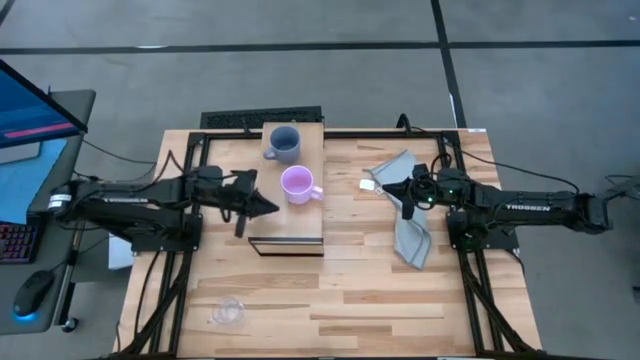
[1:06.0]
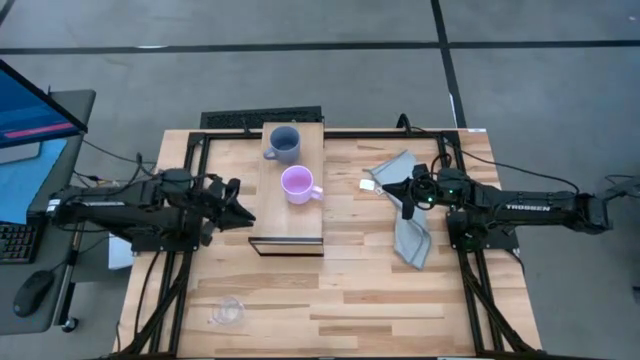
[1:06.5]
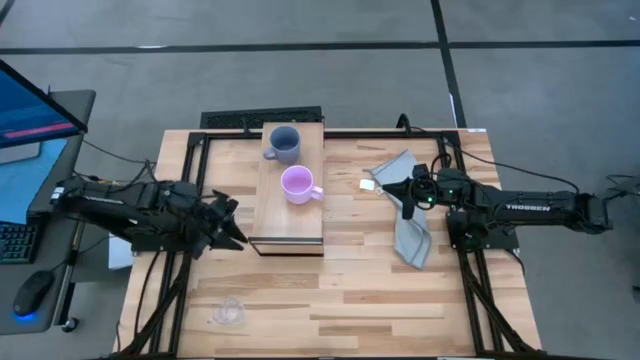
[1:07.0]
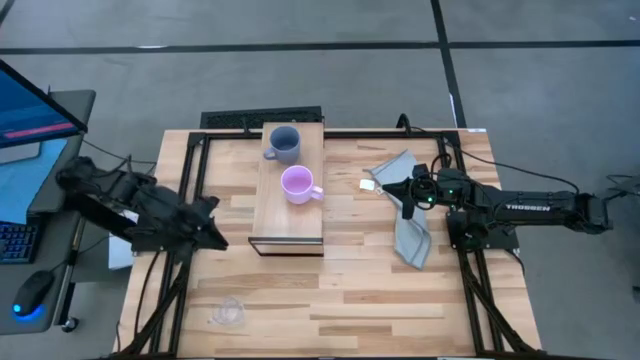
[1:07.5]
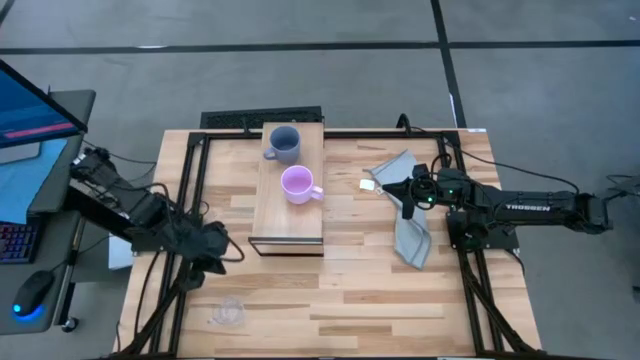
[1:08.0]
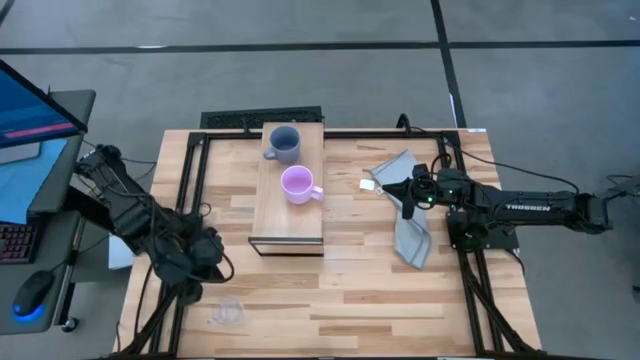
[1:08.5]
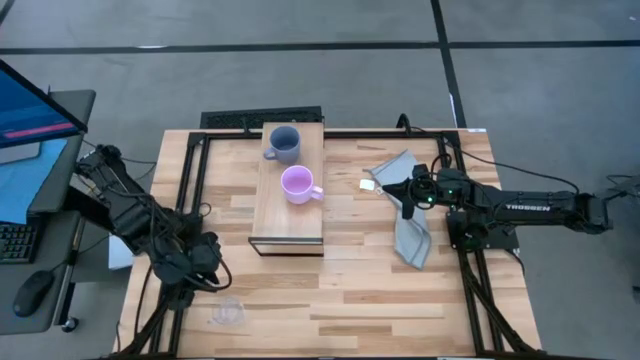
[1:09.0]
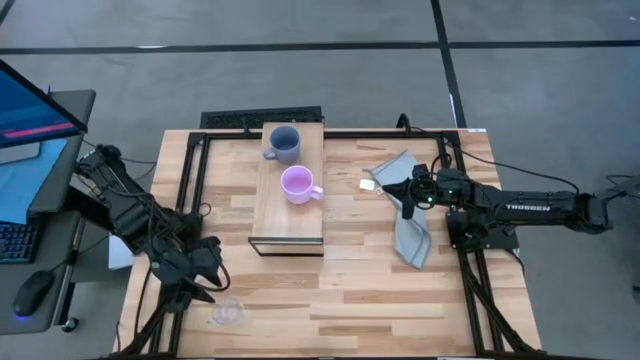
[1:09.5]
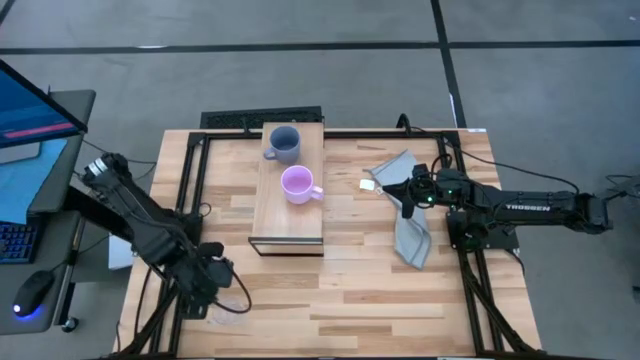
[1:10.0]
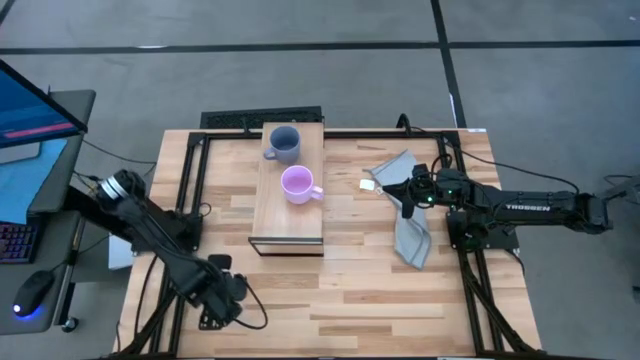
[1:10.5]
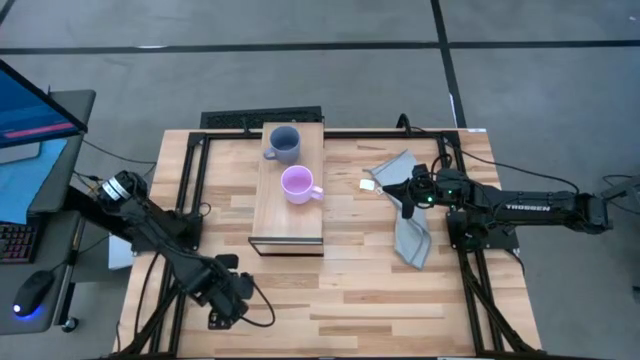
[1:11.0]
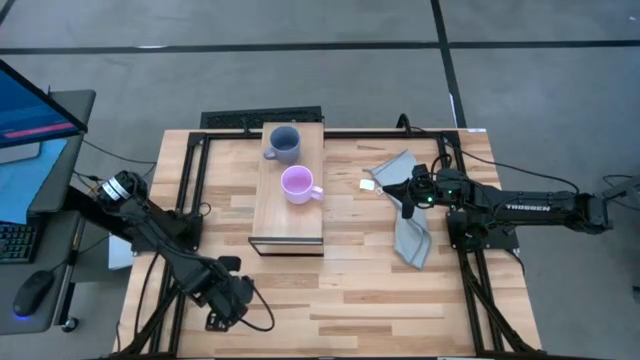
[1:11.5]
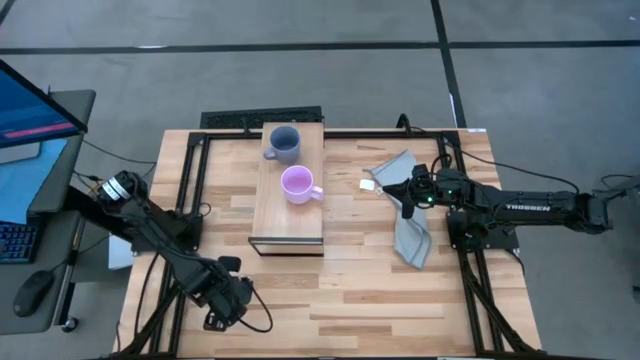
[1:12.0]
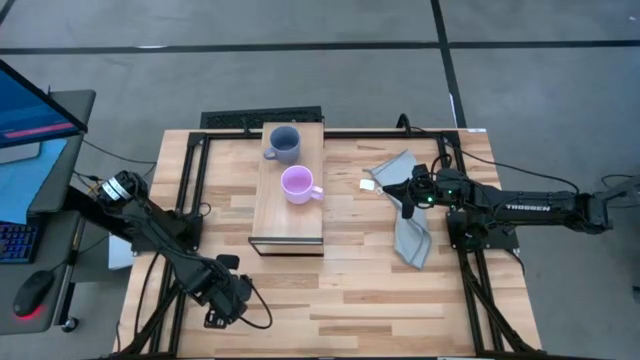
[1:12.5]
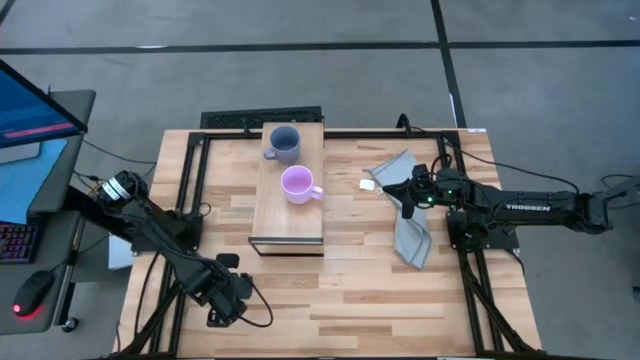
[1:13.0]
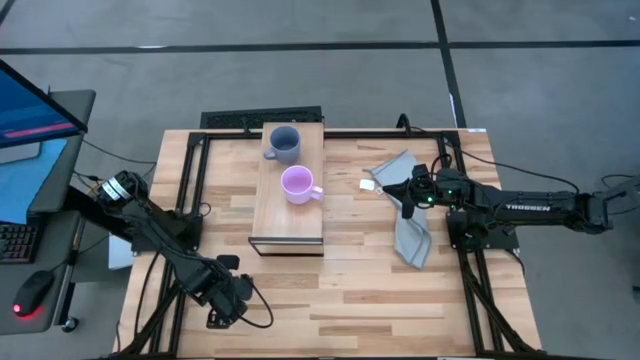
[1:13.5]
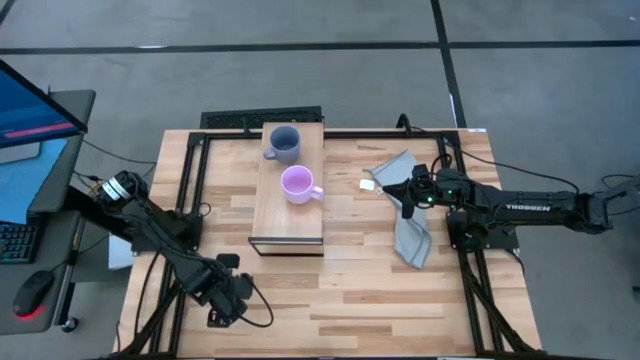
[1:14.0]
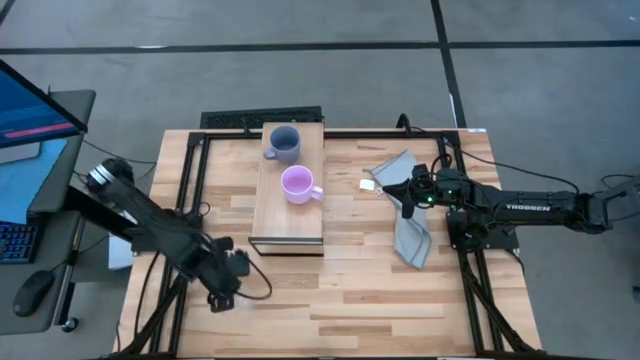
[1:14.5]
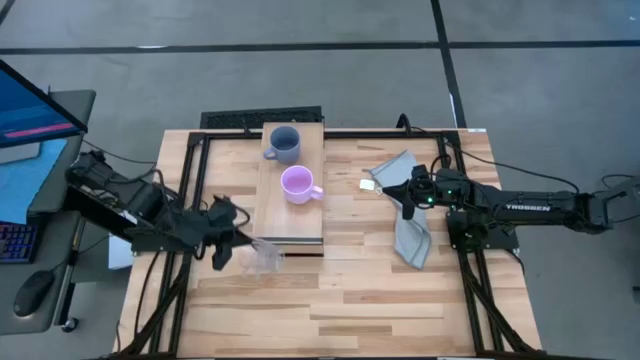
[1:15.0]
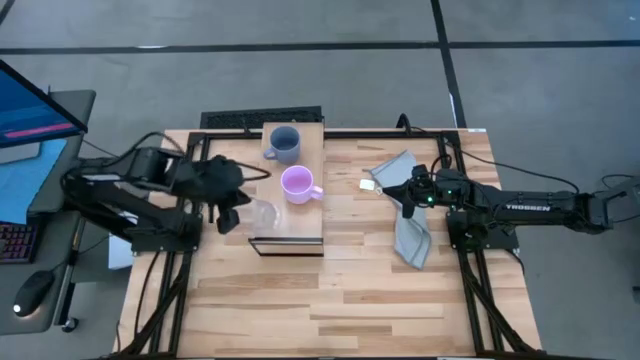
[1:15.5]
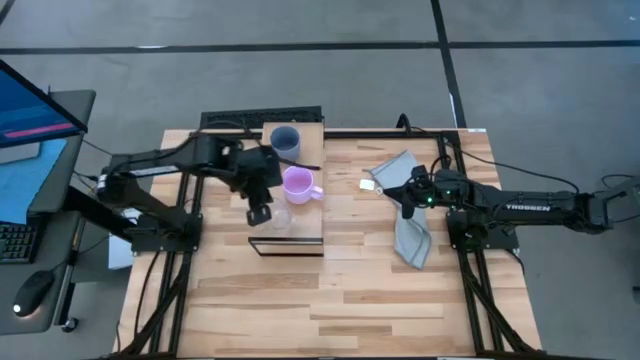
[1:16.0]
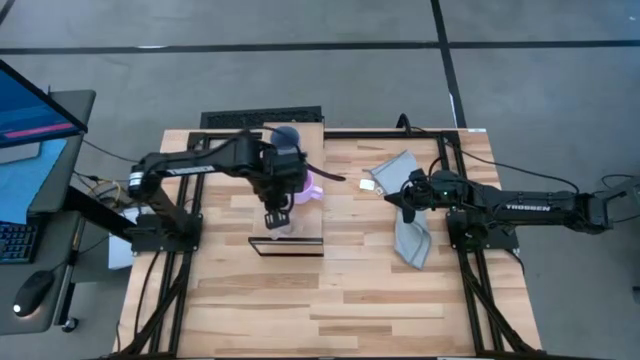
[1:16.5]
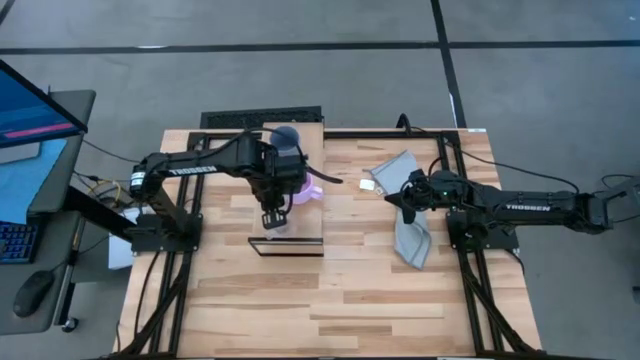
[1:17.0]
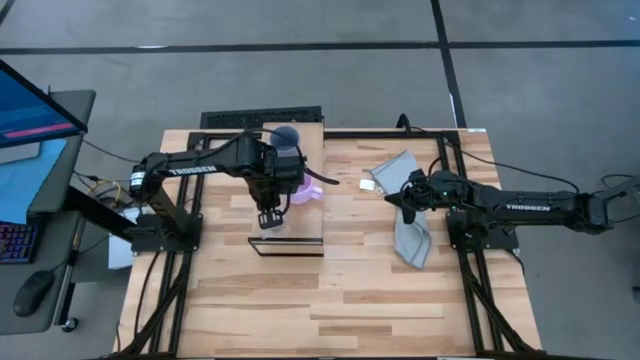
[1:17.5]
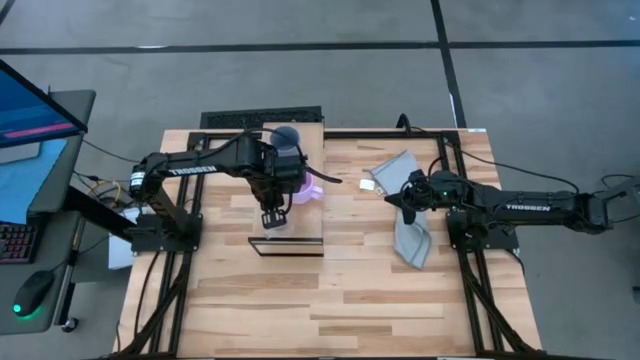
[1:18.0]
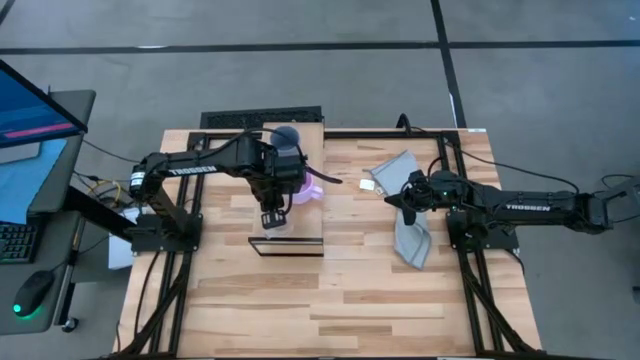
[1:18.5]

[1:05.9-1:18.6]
Task: Stack small to large cups/mugs on shelf
Put the transparent mug on the shelf

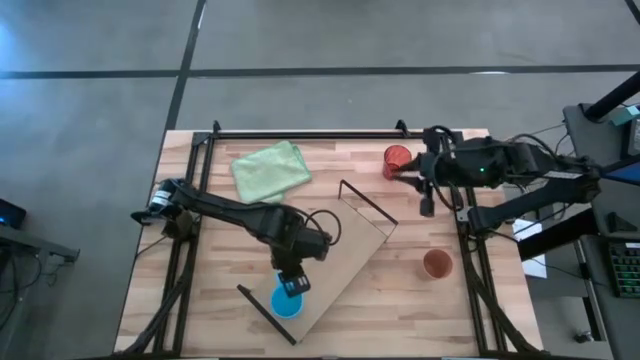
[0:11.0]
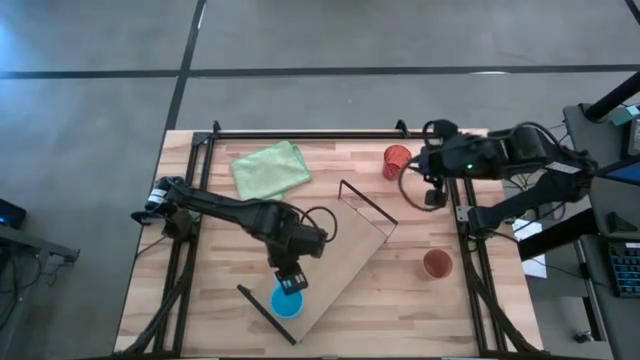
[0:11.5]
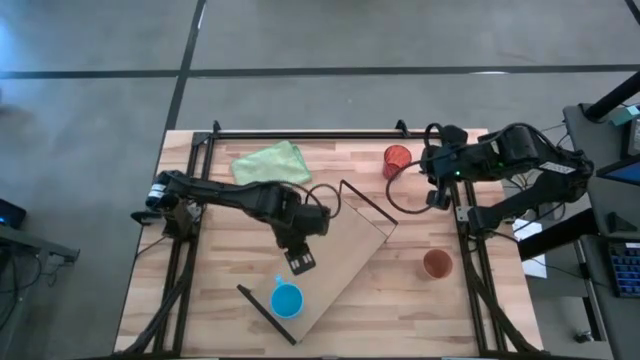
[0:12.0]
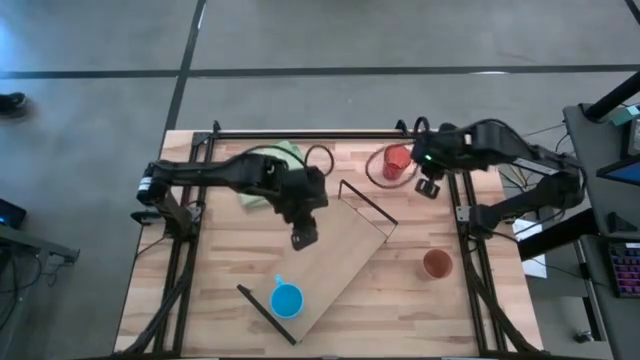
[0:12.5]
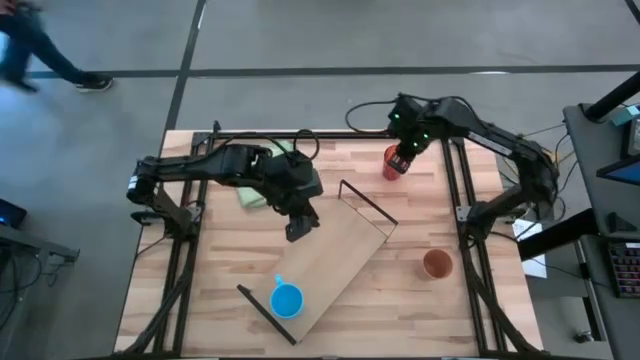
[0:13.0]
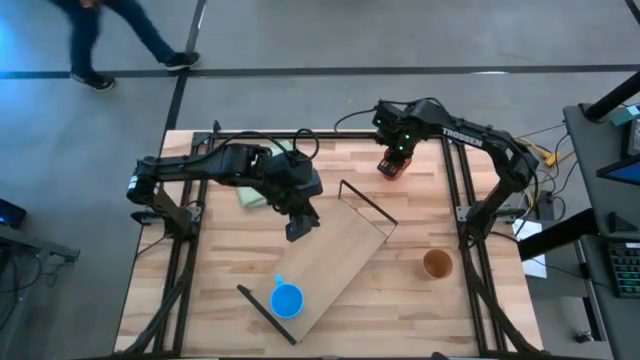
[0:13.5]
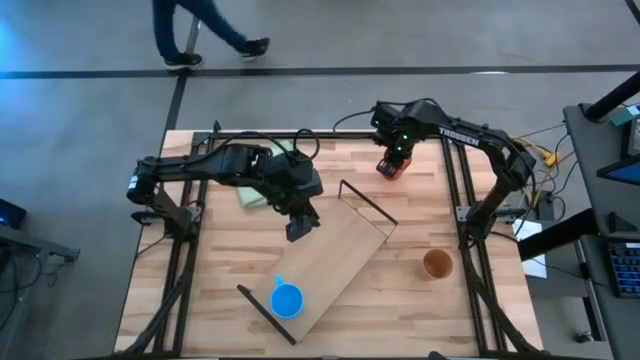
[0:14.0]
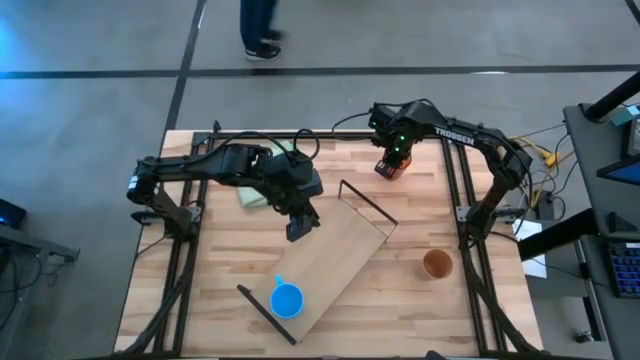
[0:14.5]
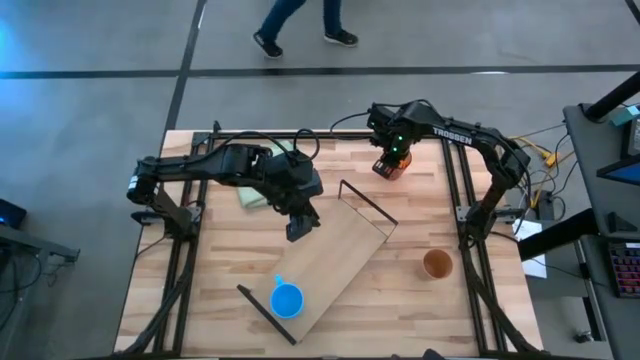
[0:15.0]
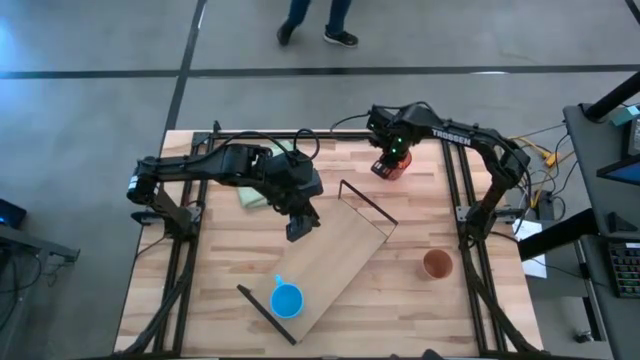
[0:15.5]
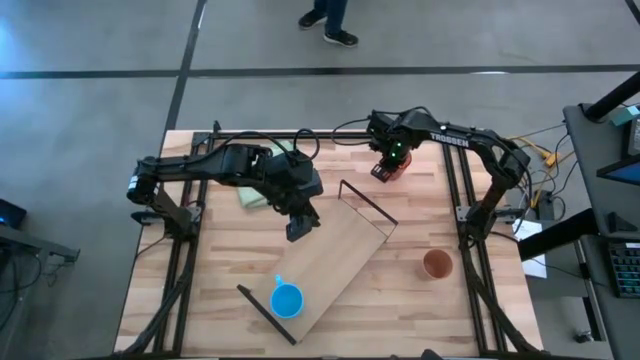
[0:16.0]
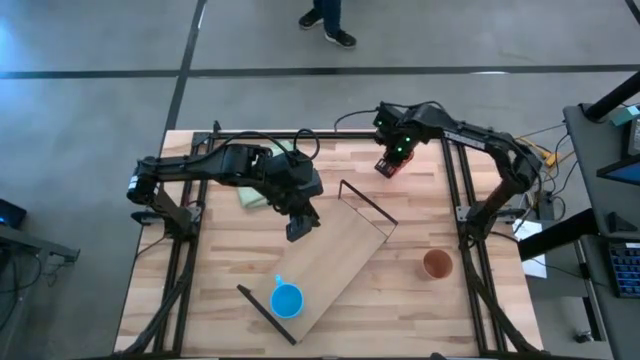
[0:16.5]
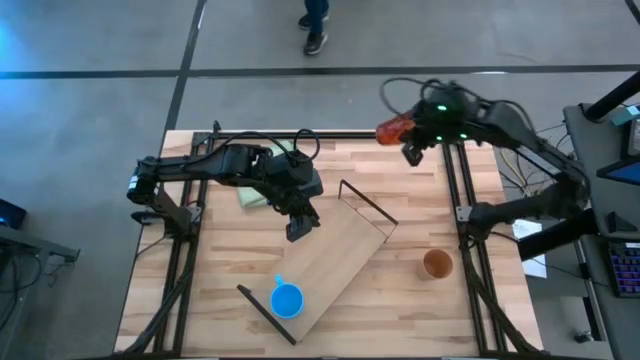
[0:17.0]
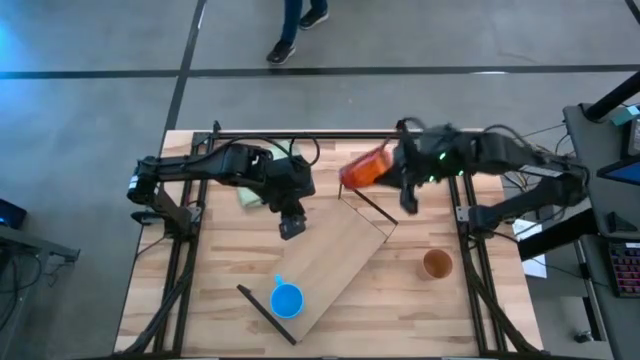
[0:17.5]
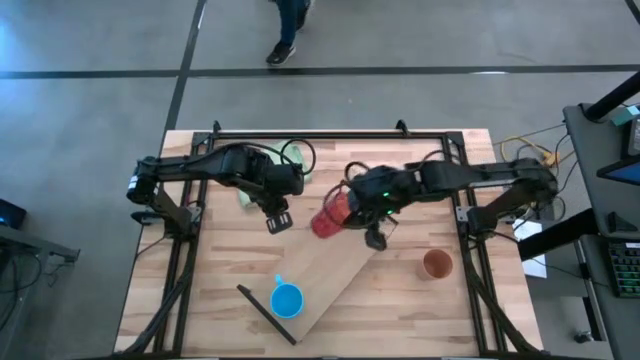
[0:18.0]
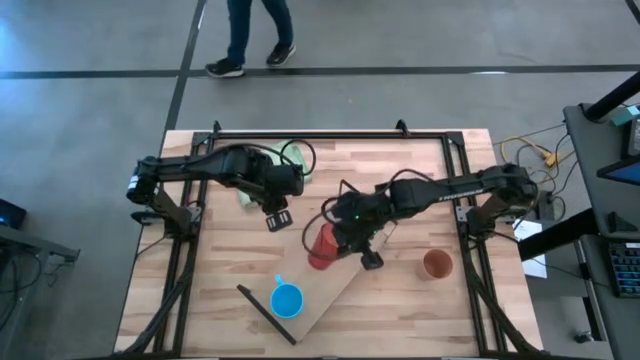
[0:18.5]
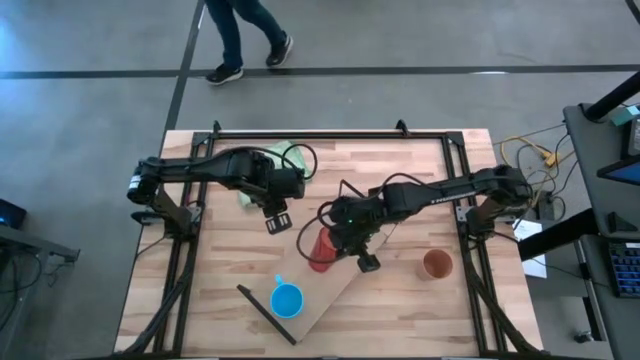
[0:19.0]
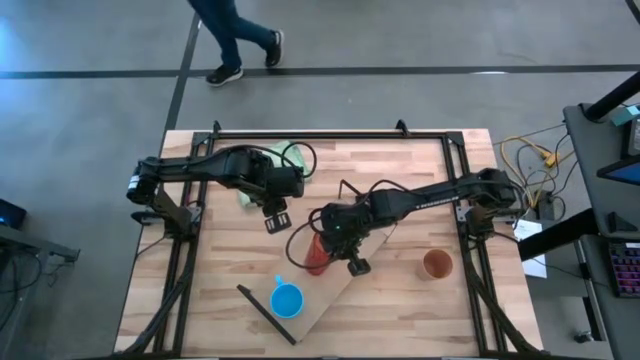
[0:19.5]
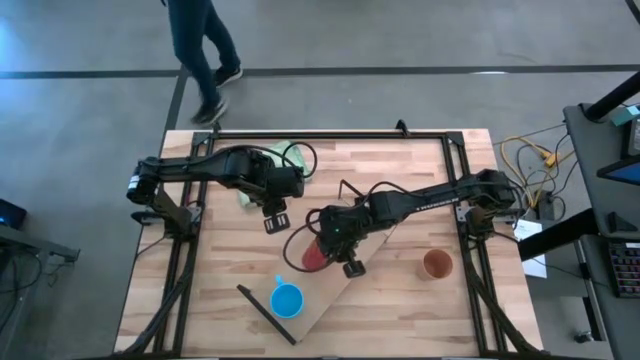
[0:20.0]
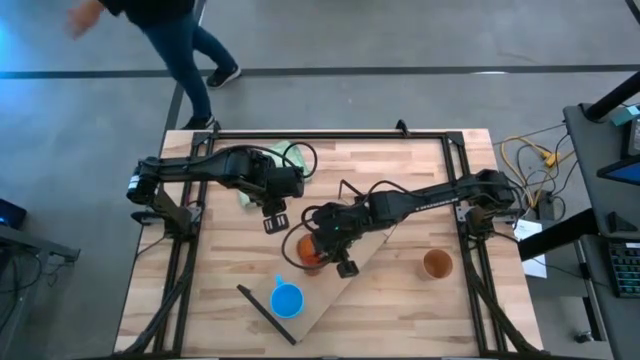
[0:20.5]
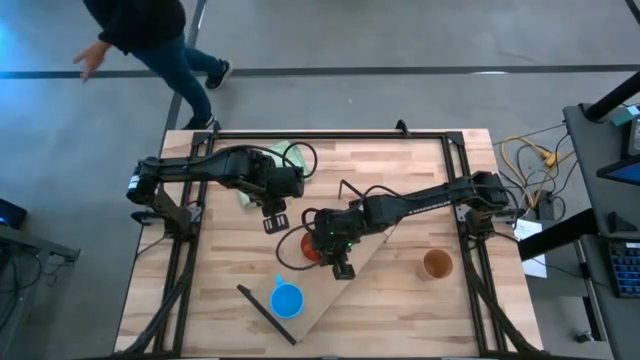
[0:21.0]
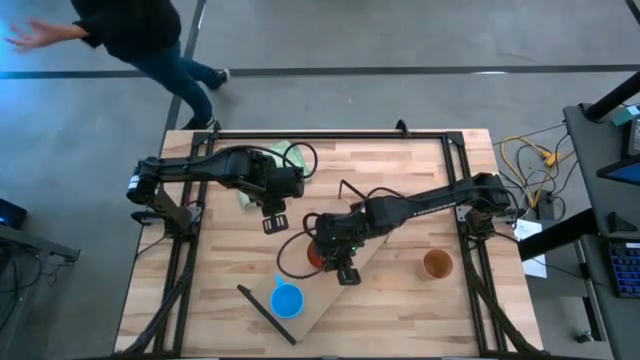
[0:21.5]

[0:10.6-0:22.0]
Task: Stack small to large cups/mugs on shelf
Put the orange cup on the shelf
